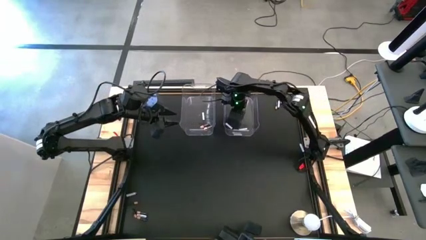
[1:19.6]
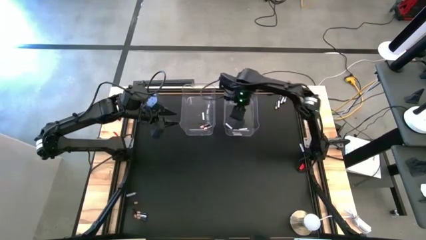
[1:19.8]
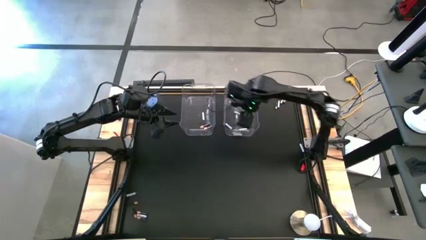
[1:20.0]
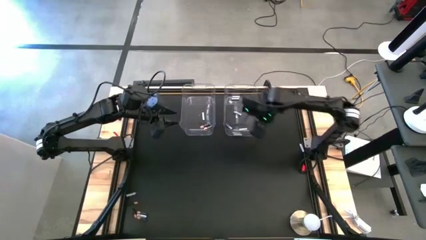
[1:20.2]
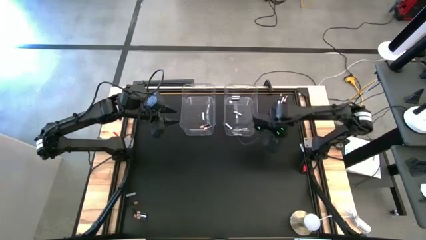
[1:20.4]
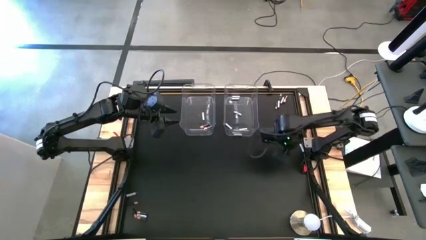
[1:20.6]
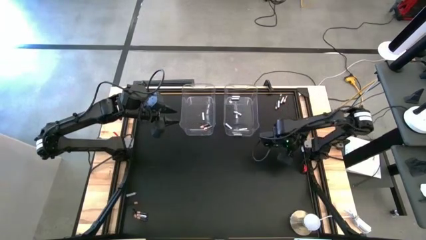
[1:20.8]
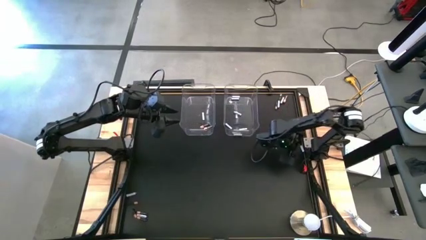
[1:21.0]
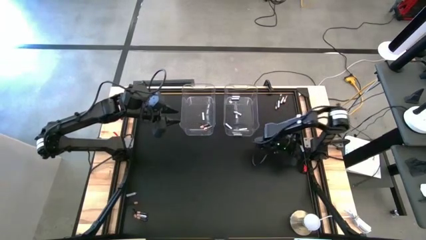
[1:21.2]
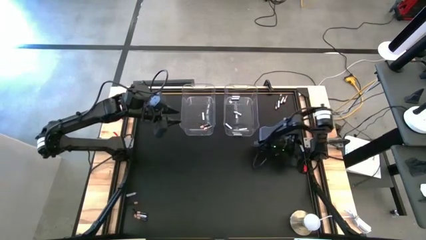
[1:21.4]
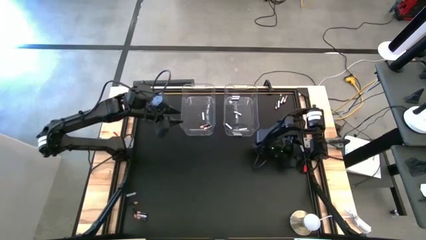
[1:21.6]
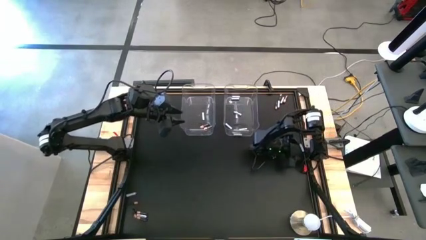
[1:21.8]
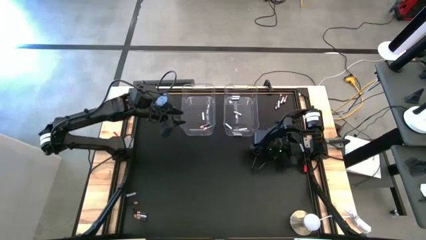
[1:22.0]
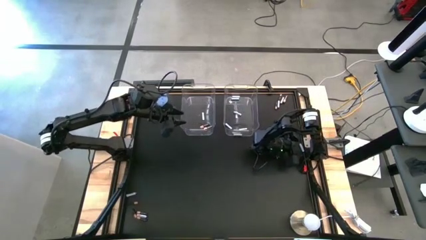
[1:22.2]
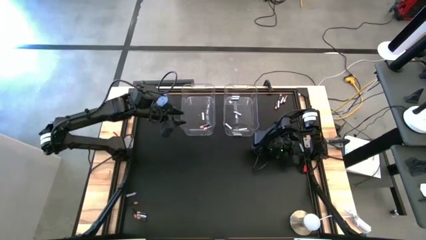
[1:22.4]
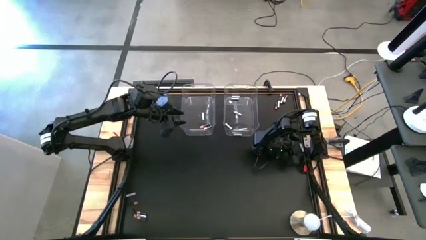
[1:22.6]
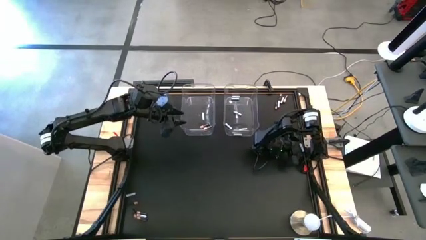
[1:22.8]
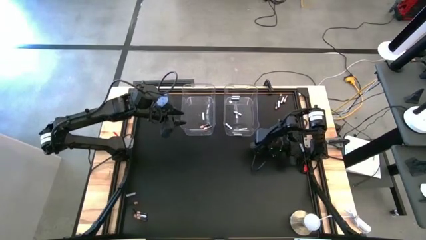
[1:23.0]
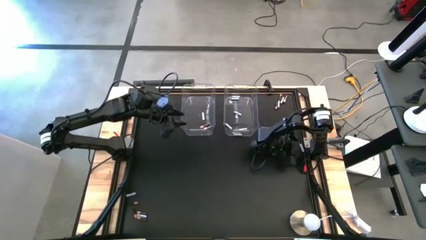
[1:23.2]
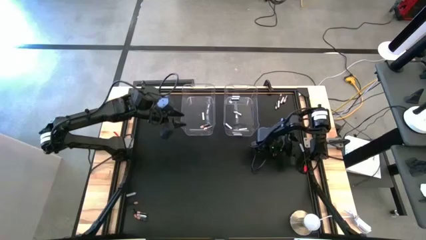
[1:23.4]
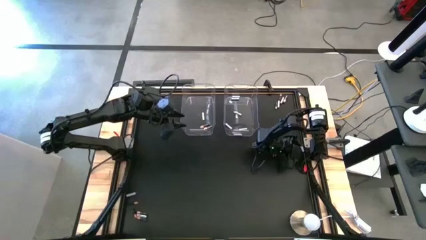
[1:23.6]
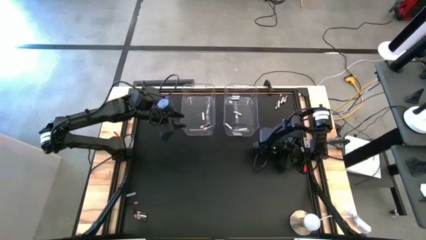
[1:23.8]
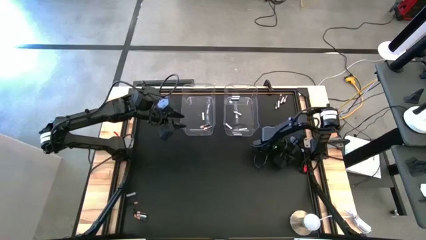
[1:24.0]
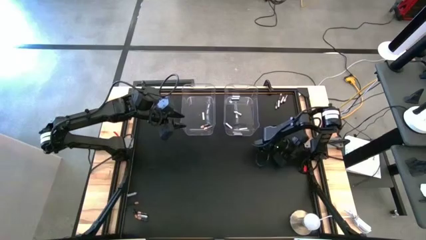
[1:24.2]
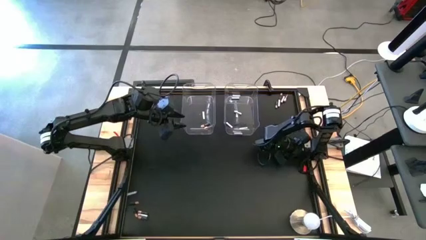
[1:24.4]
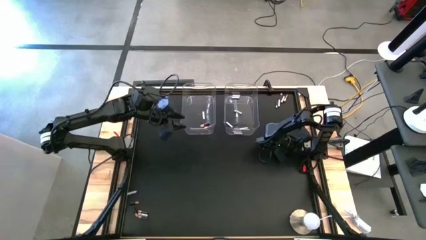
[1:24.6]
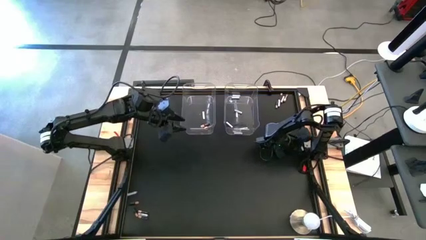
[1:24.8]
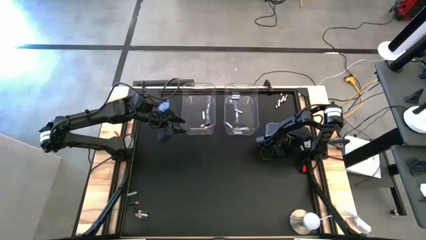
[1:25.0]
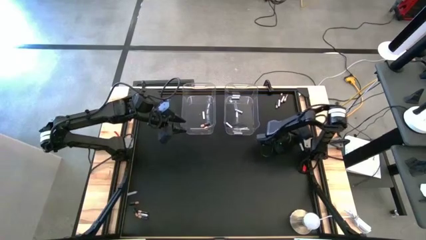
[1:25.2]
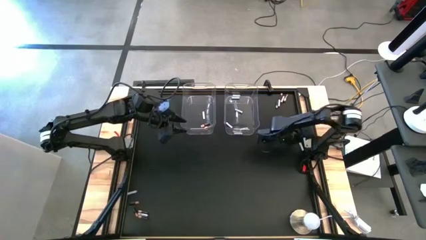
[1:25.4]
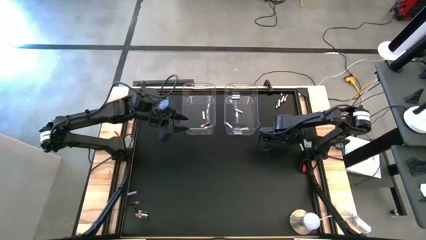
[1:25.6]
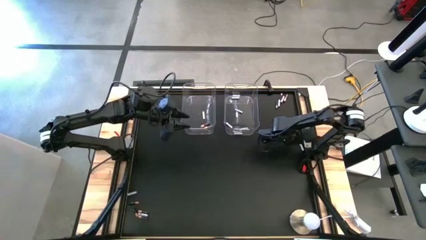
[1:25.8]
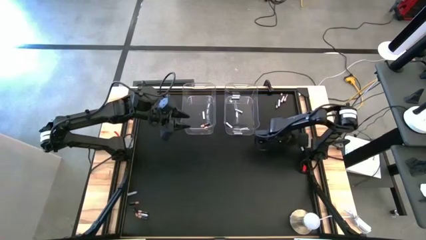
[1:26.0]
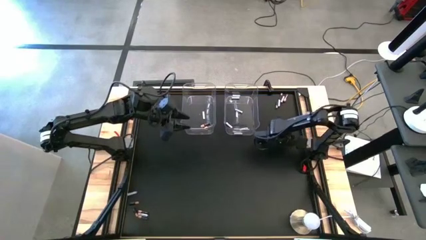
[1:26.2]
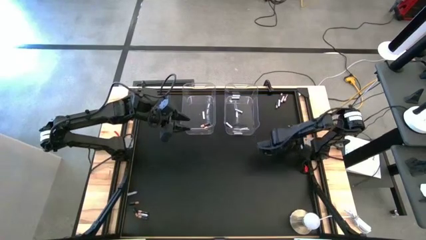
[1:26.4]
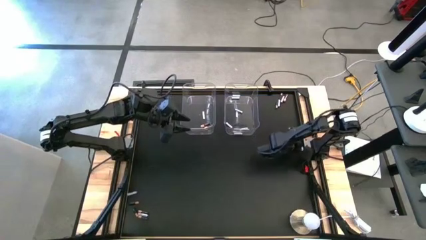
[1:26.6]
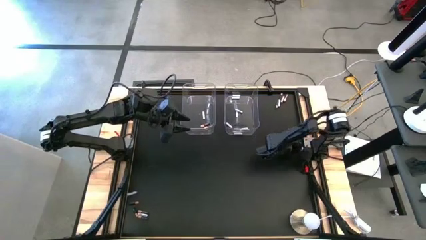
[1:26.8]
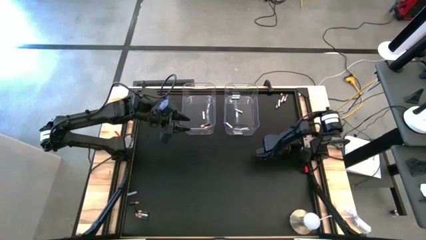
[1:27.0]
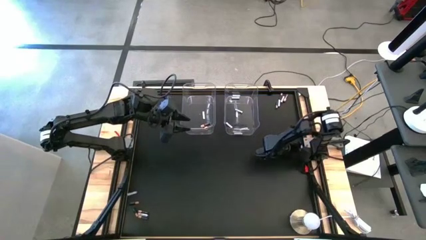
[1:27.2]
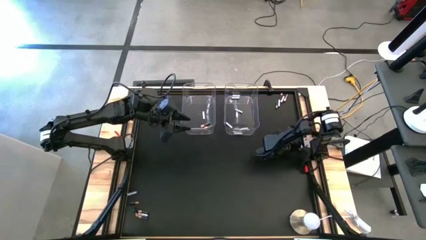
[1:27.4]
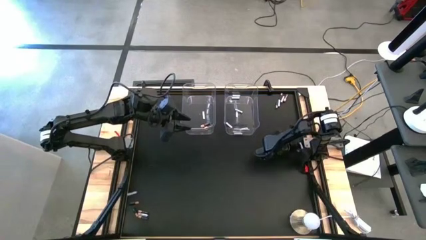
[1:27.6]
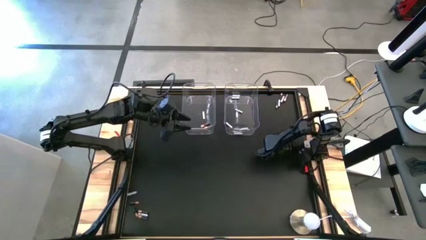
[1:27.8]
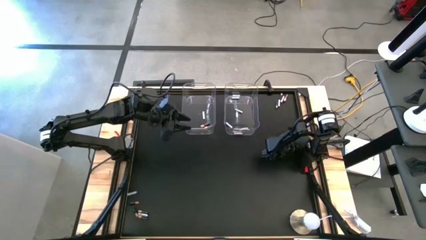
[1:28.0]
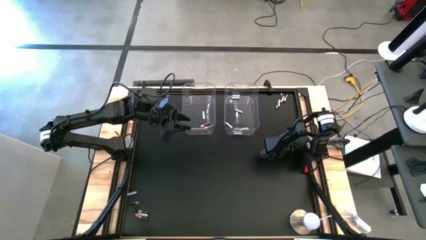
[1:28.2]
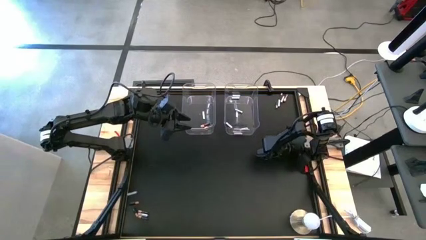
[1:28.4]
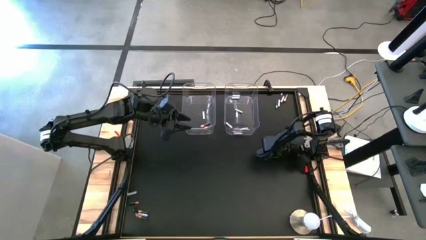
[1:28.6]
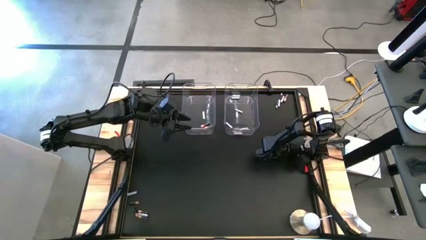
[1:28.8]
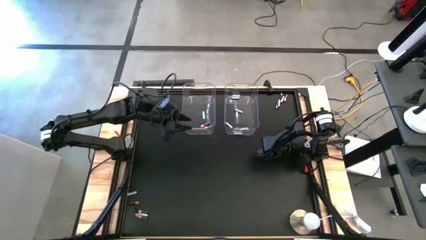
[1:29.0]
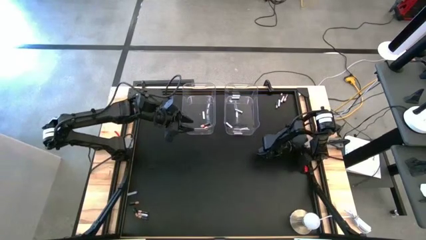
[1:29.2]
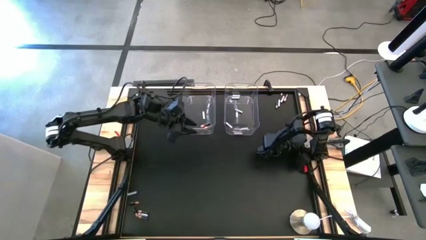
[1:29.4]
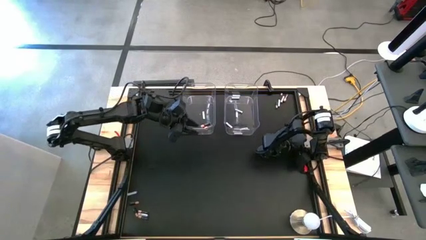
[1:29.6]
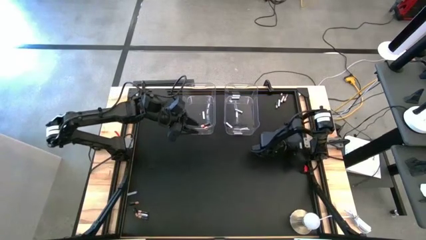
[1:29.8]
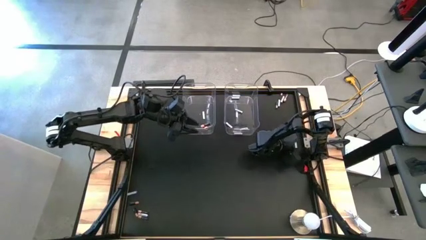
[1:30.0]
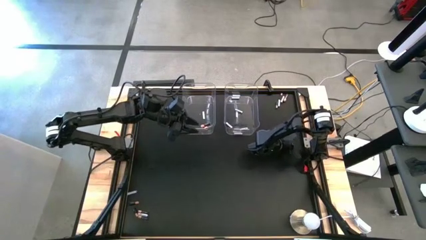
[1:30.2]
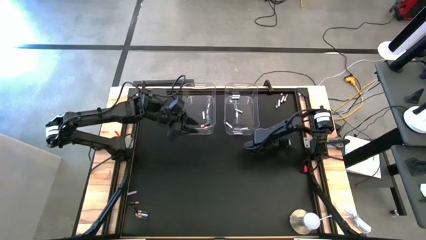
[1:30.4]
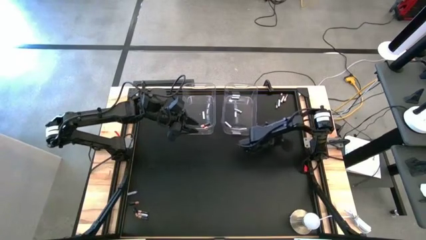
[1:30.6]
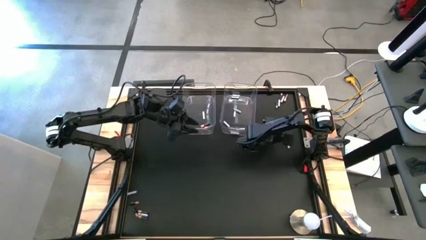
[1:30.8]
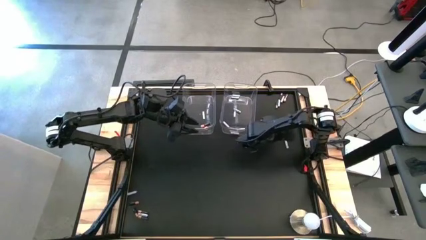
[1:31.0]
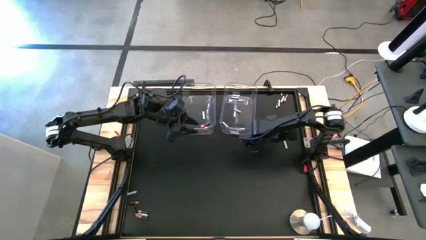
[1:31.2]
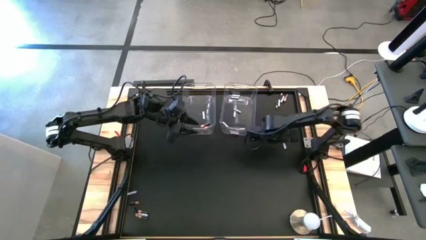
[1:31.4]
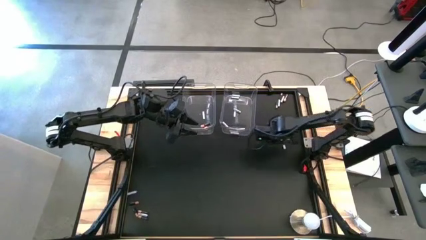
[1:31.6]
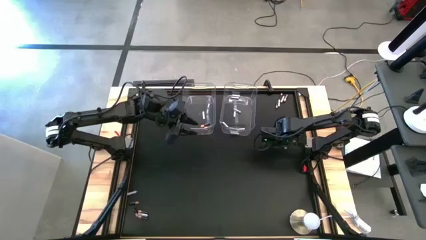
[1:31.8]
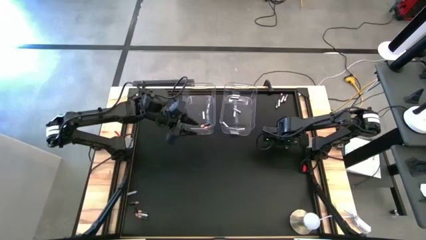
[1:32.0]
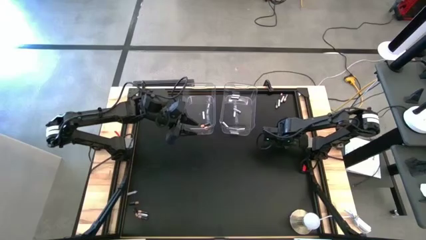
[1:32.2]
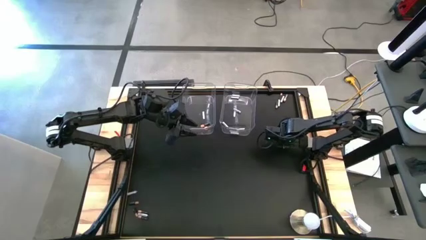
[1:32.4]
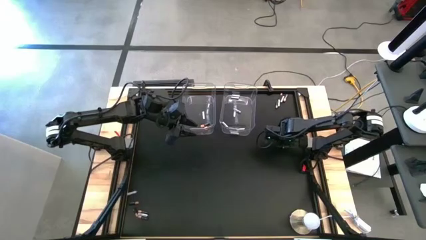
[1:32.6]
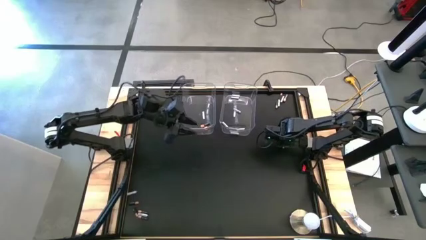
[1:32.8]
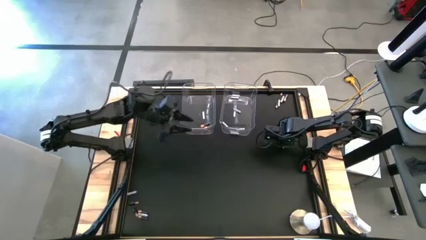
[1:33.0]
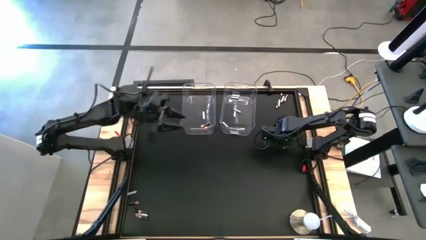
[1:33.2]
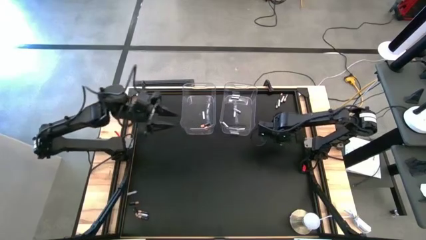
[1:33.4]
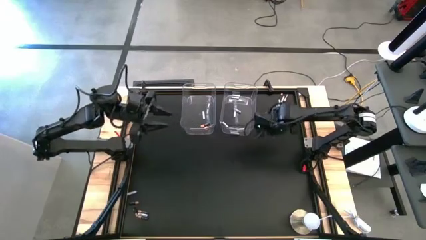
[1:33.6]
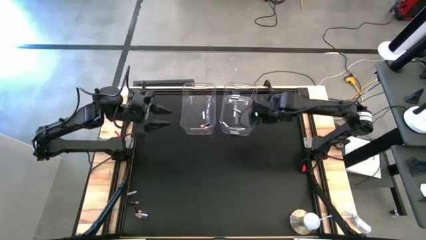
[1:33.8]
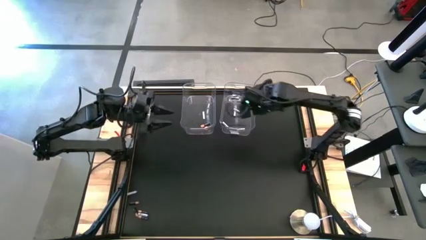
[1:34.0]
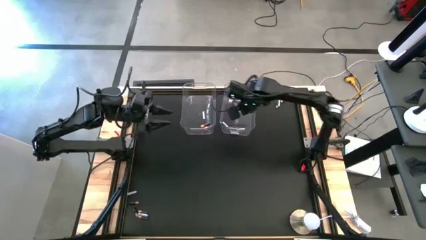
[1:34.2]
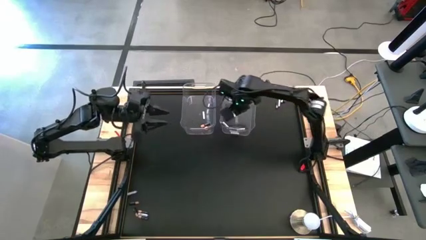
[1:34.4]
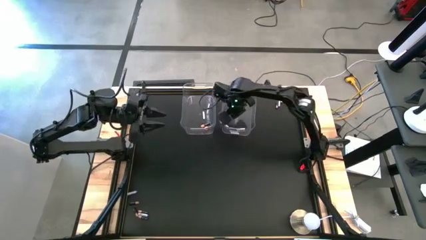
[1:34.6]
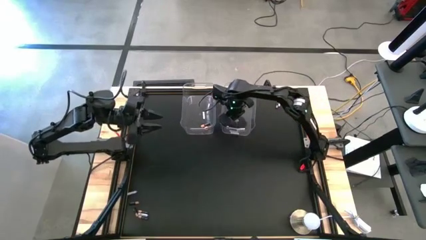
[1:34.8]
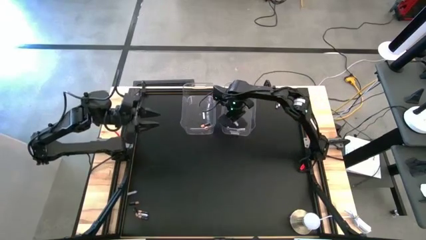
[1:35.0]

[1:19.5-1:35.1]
Task: Sort batteries
Put the white battery into the right transparent bin

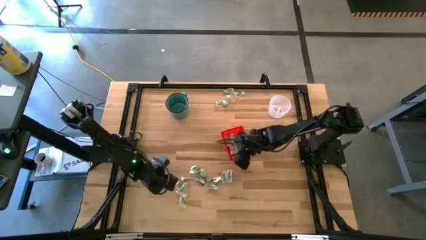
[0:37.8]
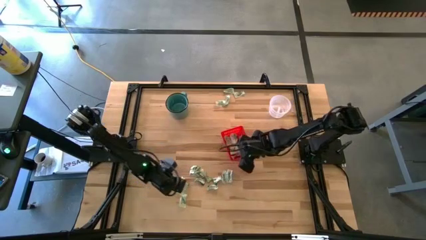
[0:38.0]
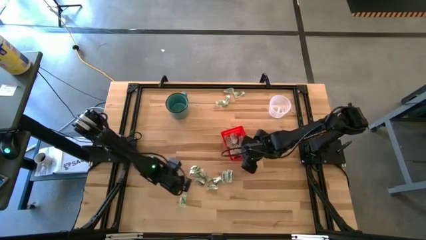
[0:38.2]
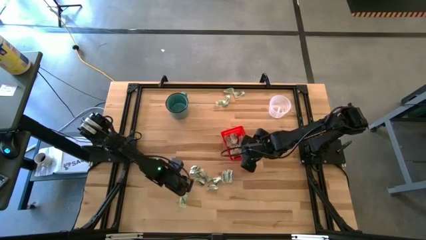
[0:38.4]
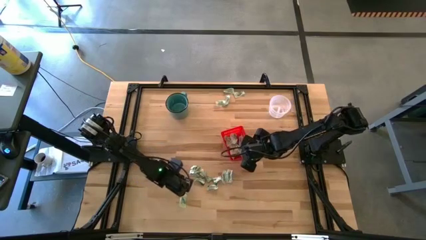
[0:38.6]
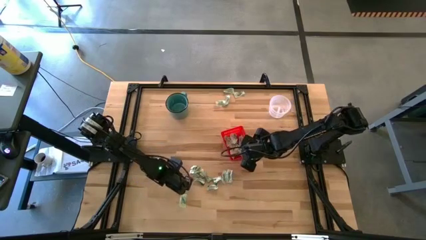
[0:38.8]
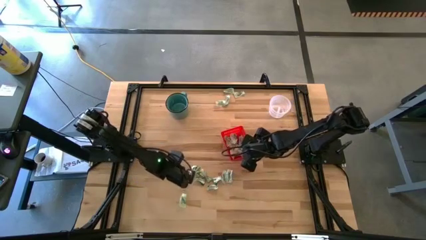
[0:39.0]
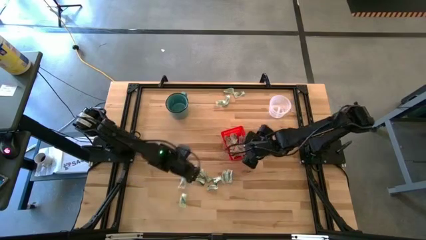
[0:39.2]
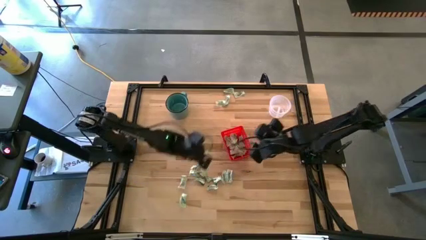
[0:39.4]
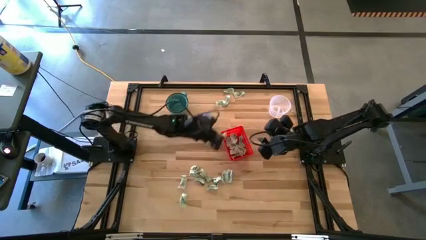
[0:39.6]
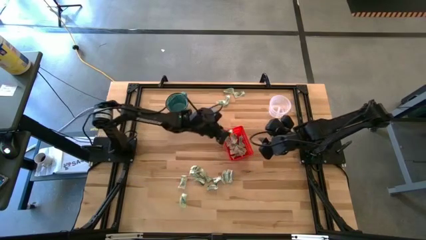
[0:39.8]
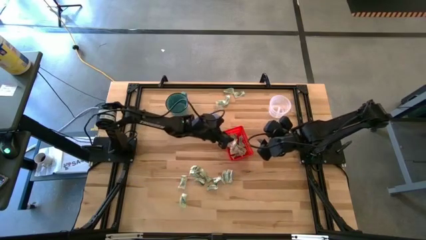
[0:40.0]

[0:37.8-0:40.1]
Task: Pick and place items into bin
Put the stevia packet into the orange bin
